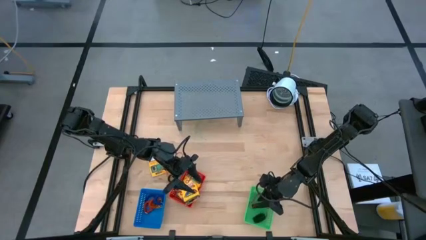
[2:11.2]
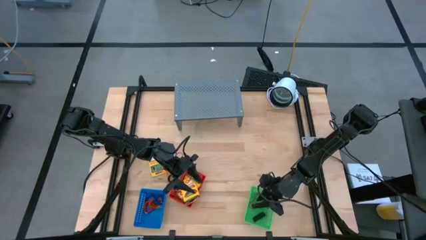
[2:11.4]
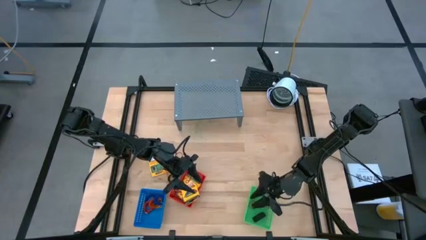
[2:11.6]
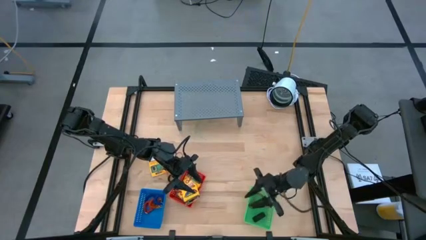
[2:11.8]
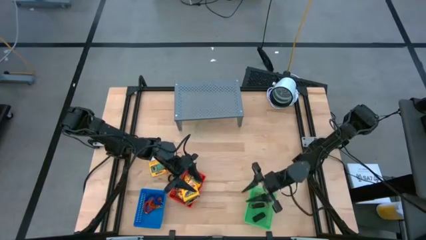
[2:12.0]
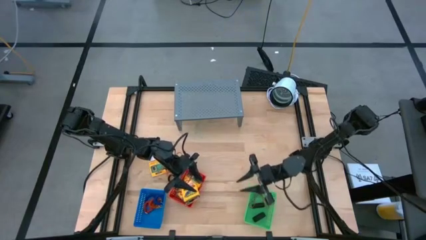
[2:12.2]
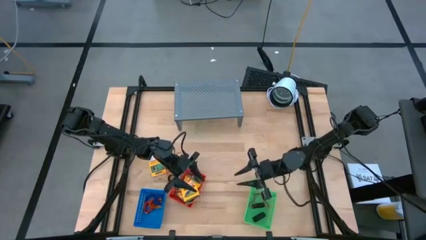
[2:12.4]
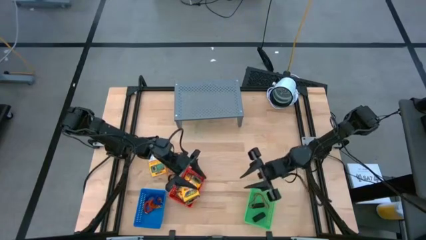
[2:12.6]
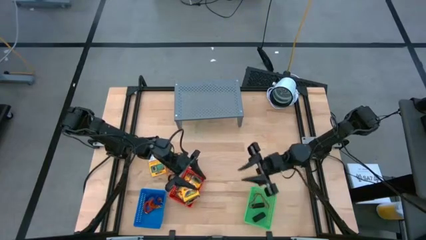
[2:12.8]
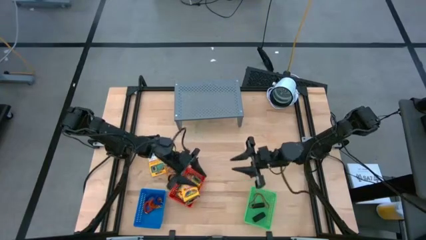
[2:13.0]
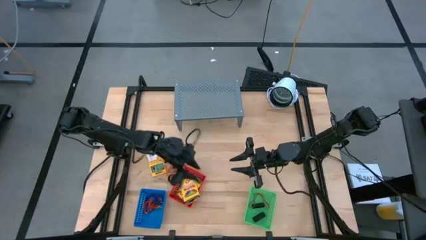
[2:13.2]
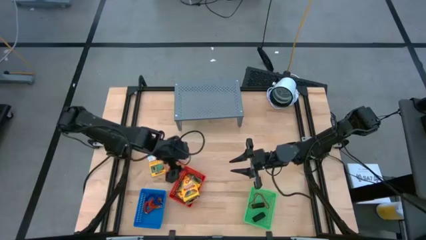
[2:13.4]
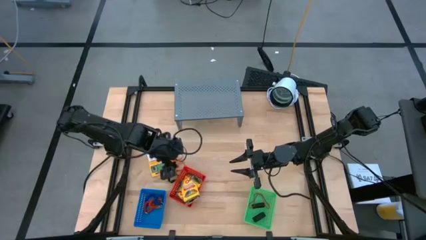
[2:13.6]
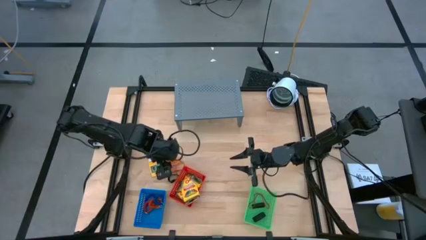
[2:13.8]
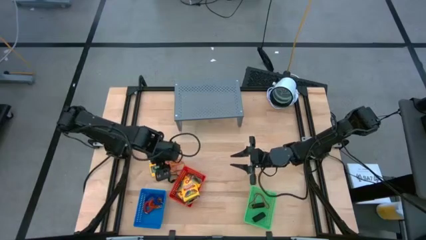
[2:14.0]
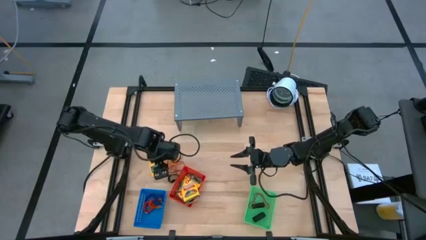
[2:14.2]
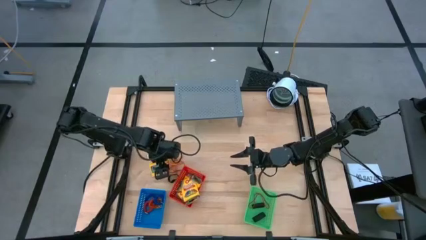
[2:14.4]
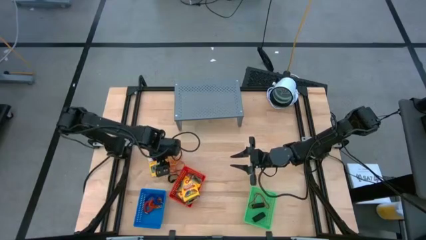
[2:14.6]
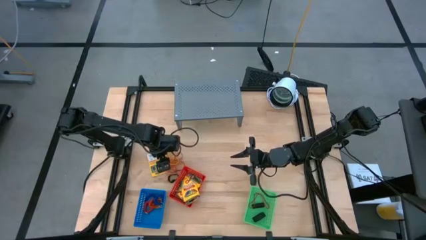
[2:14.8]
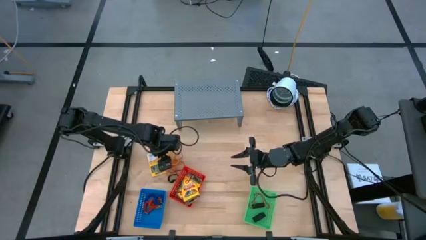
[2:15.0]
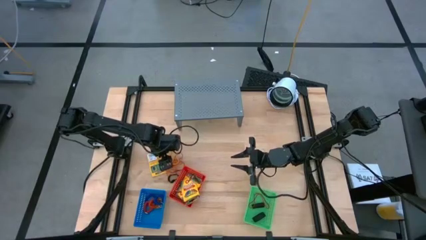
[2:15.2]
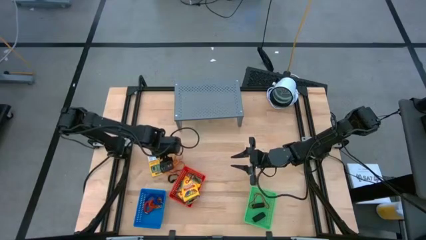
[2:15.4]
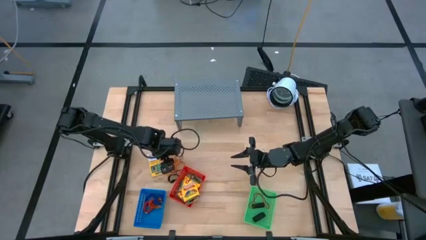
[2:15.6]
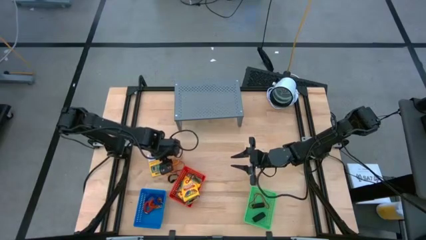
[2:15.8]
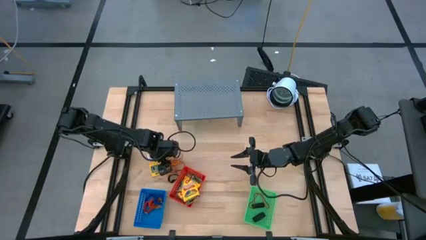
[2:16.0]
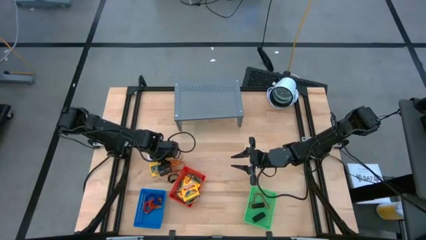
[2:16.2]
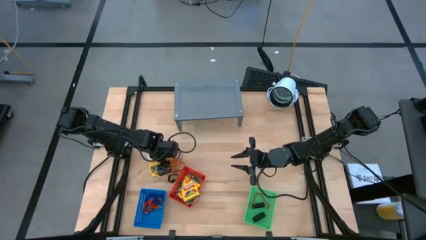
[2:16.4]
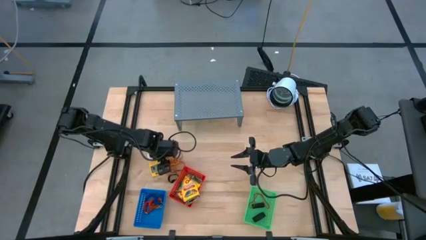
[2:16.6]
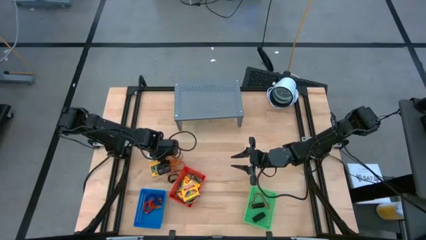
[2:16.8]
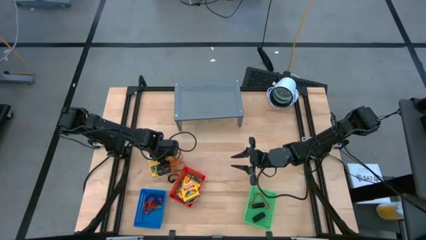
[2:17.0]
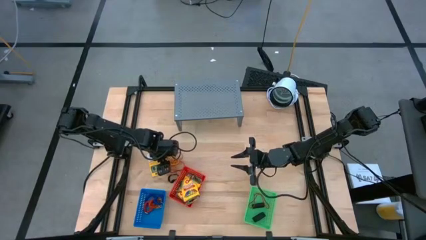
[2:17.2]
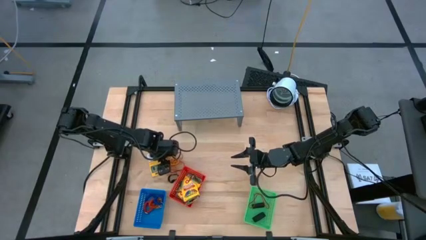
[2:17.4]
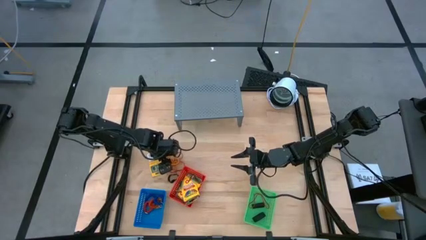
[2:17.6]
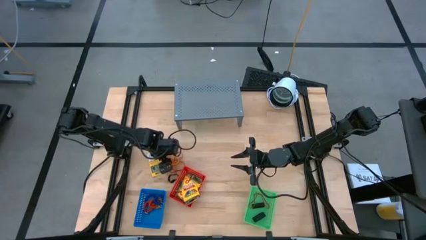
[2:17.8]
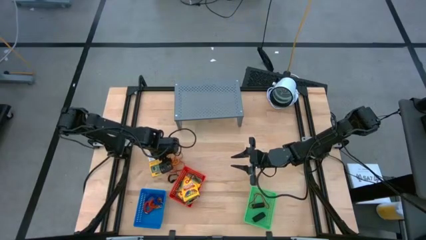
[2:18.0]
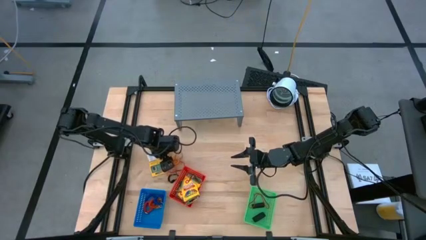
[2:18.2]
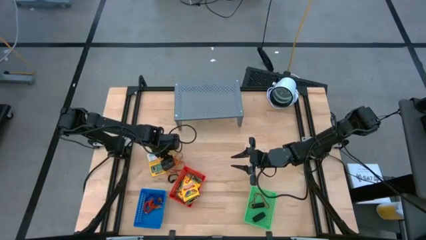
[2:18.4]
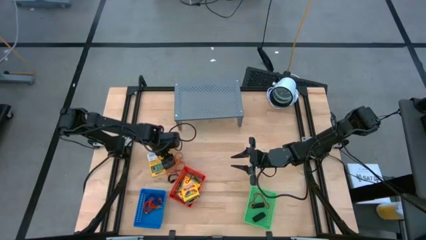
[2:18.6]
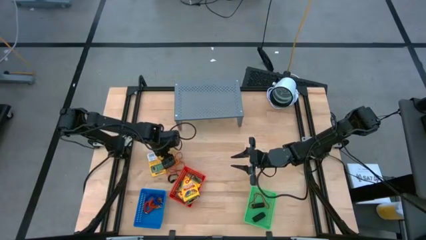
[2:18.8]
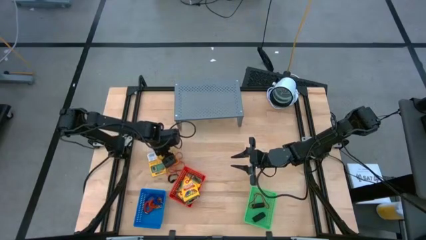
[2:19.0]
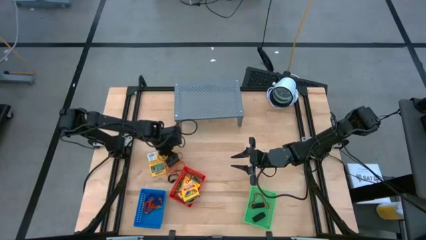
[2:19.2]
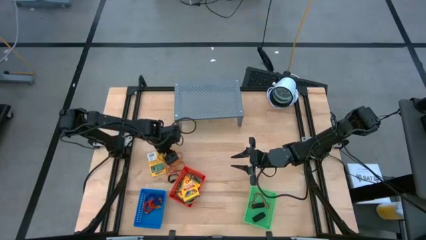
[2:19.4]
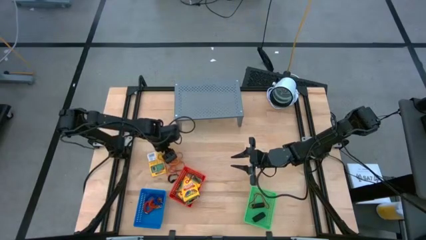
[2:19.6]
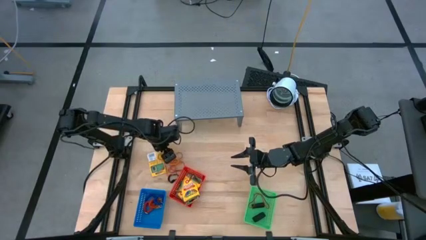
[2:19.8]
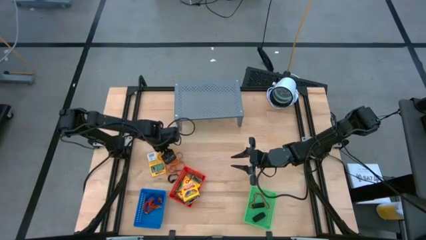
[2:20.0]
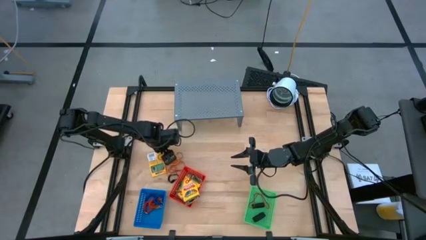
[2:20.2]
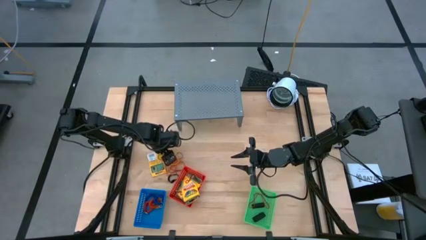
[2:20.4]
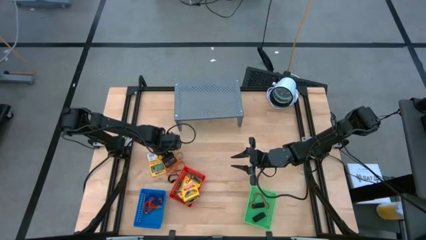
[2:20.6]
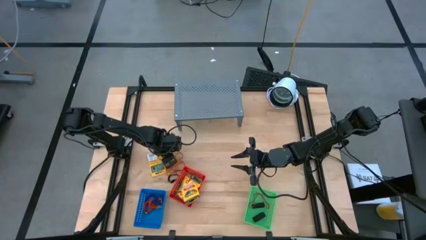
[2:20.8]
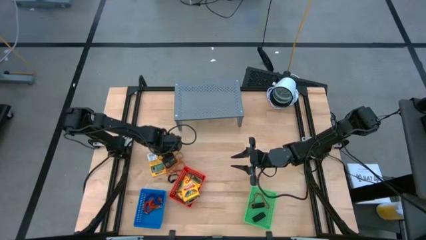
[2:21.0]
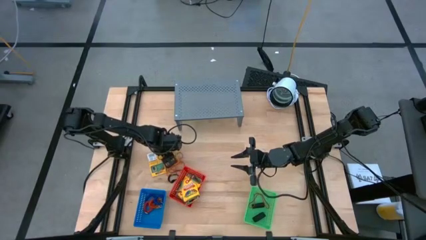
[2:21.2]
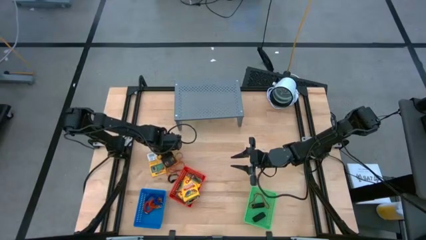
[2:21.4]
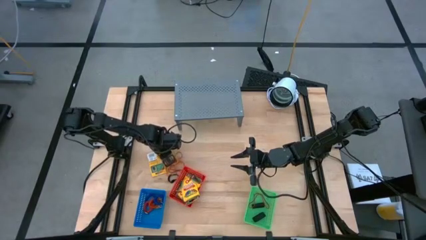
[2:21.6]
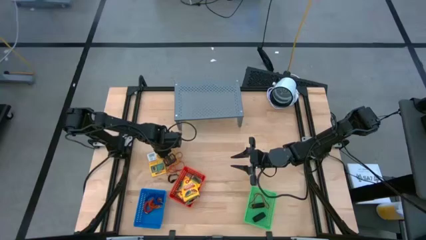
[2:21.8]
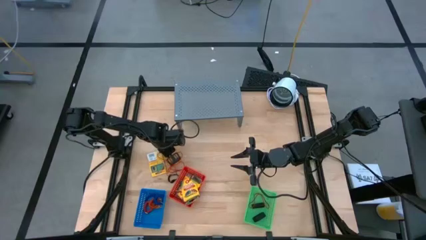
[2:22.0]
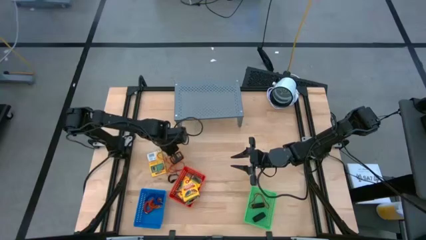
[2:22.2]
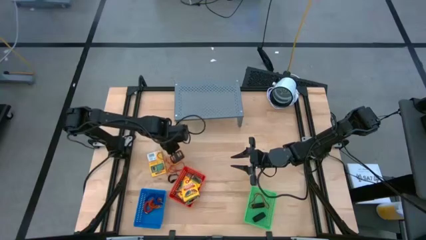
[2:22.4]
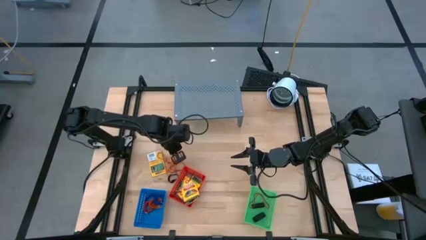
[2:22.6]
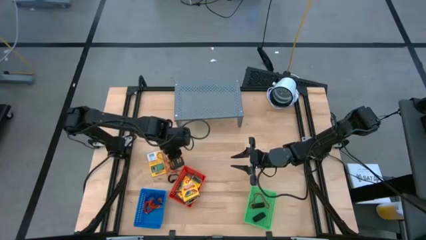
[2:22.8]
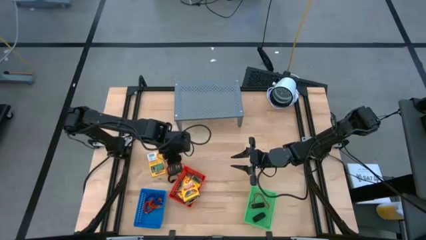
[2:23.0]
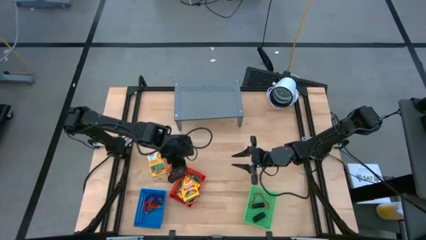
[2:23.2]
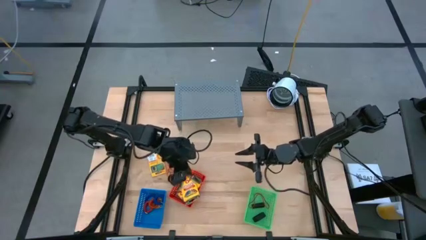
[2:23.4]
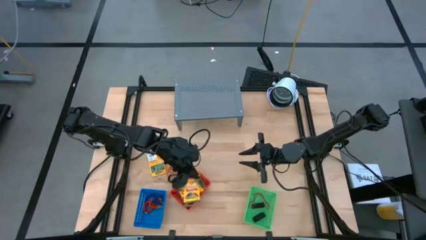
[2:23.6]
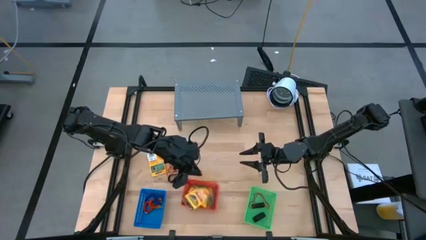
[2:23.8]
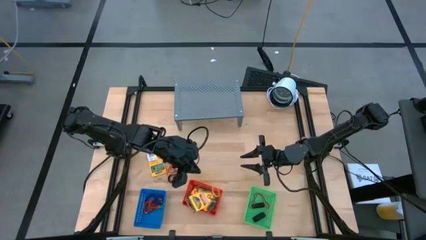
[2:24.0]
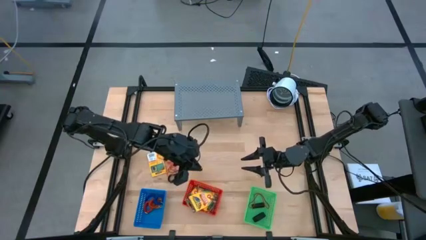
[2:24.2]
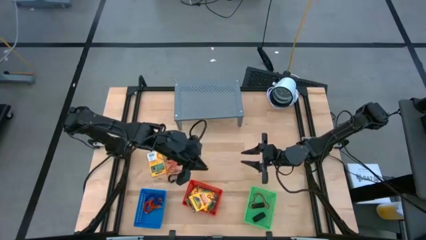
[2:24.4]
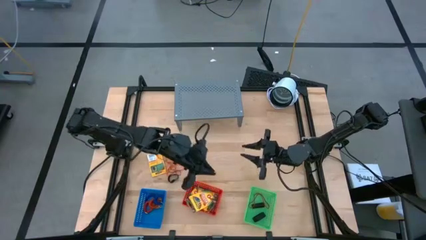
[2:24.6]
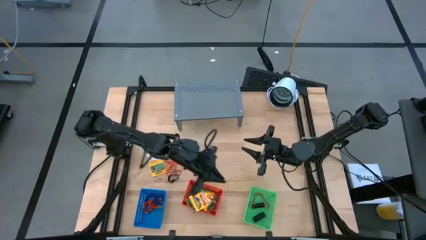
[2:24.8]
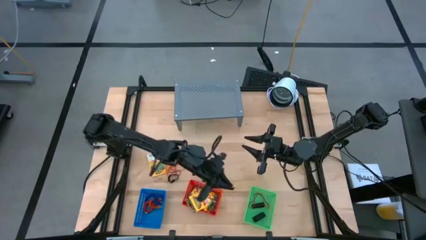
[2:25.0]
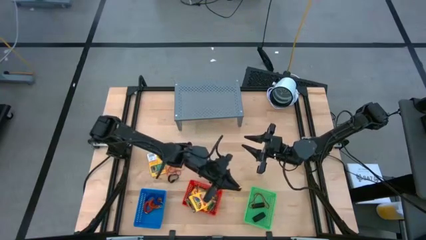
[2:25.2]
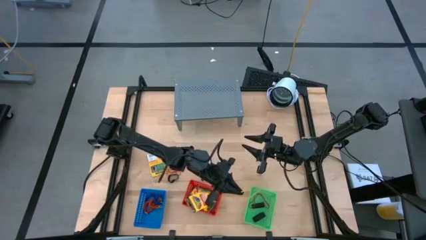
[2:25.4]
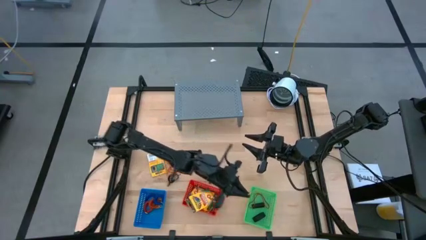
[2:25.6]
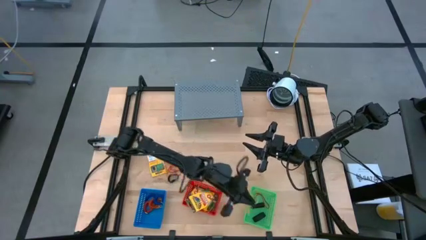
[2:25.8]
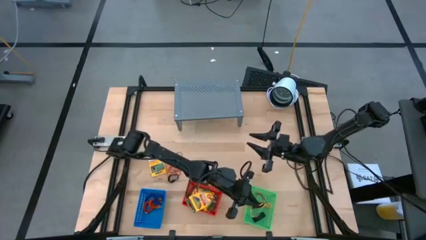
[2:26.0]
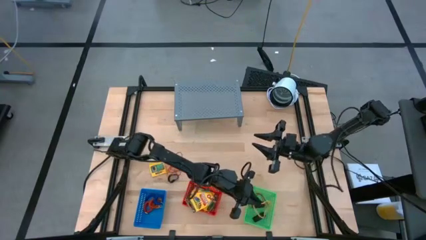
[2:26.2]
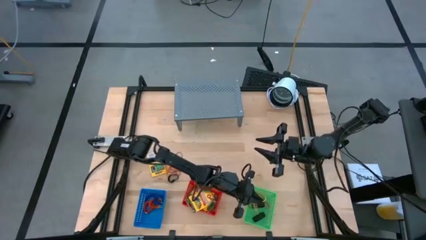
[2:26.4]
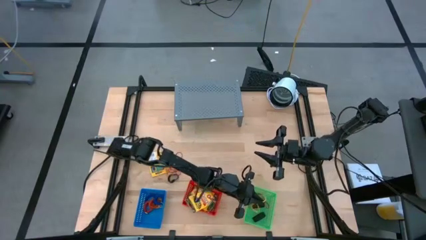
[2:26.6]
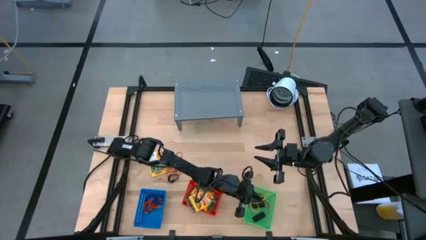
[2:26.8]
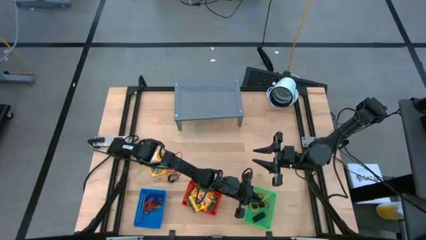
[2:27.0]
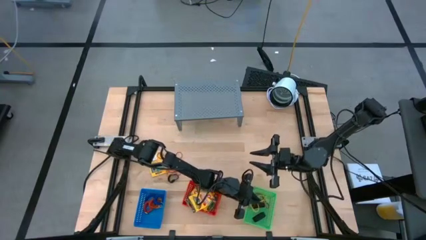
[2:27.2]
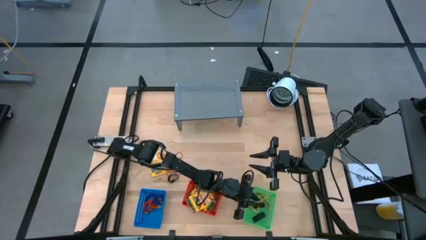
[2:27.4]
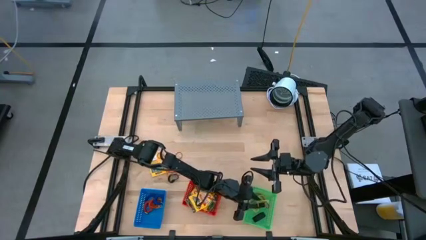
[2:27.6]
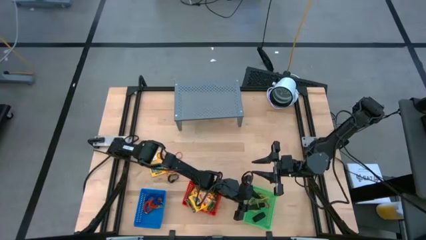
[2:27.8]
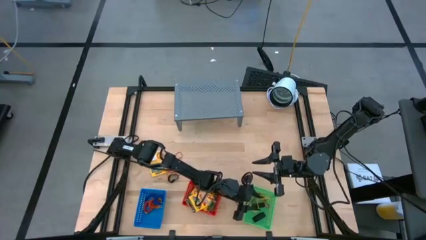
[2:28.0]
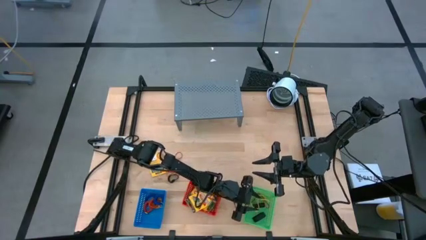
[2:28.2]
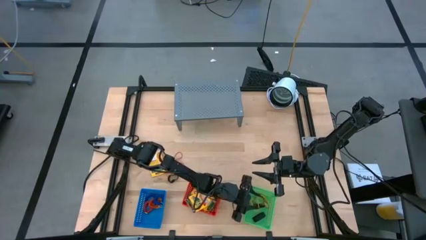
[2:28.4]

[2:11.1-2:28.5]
Task: Pick & Place Office Desk Supplies
Put the yellow rubber band into the green basket
